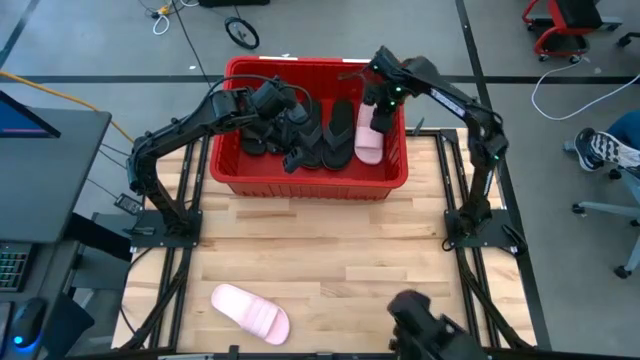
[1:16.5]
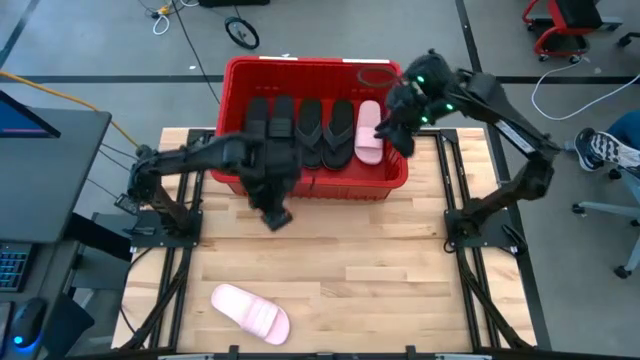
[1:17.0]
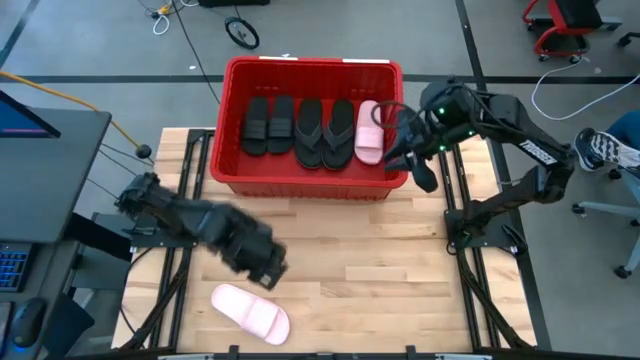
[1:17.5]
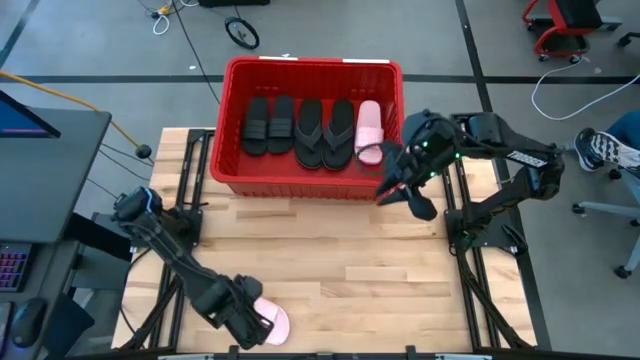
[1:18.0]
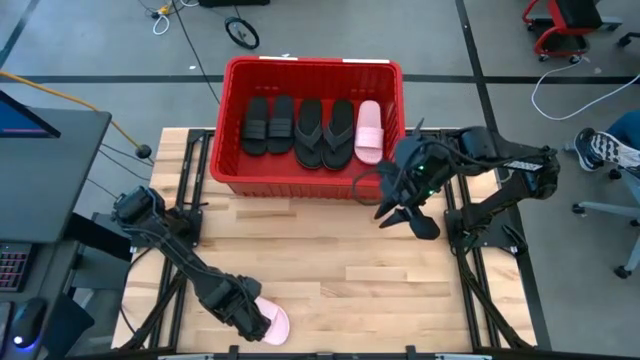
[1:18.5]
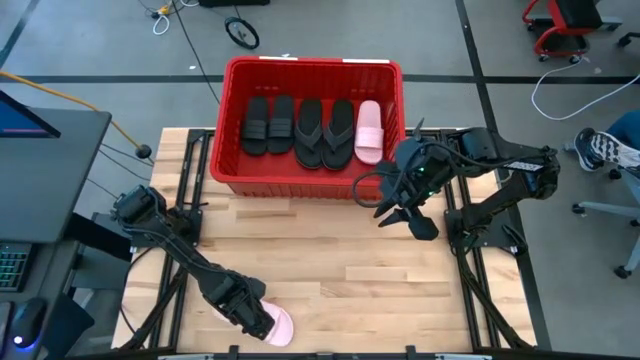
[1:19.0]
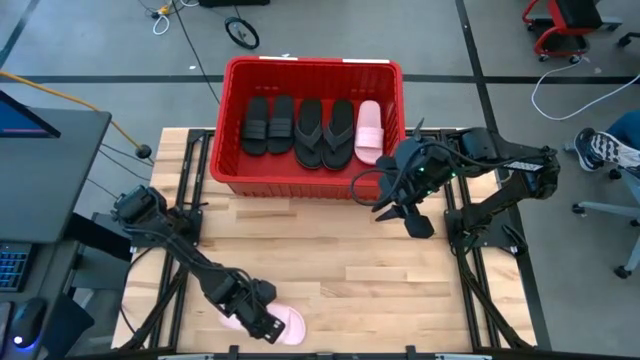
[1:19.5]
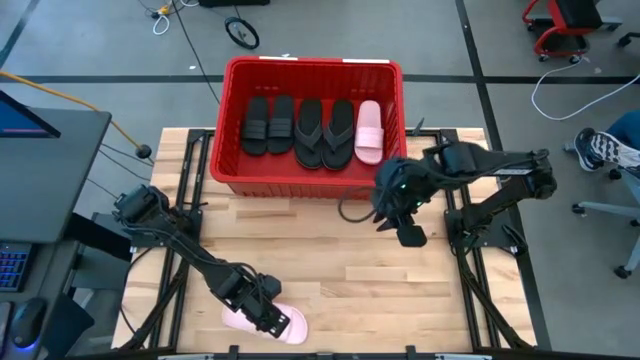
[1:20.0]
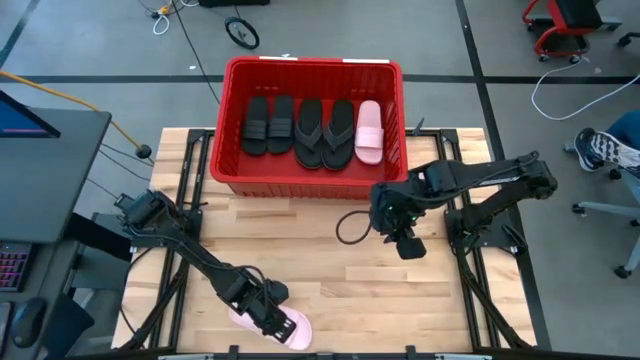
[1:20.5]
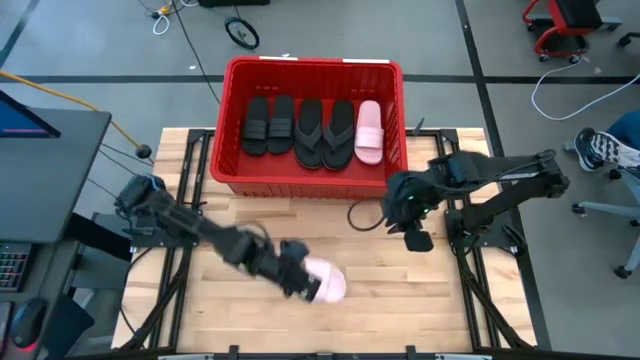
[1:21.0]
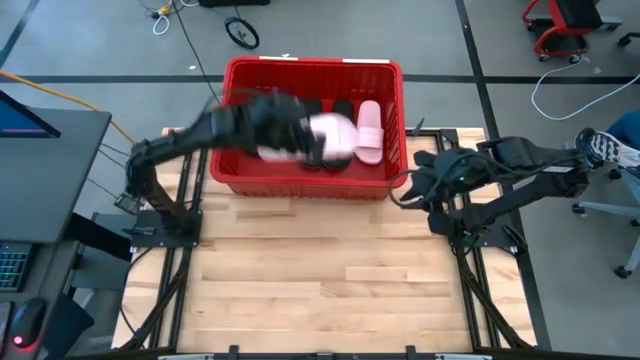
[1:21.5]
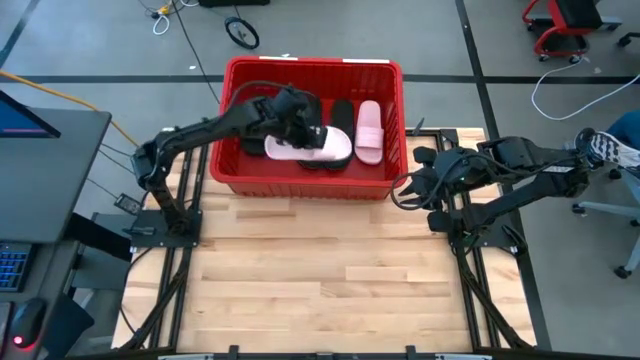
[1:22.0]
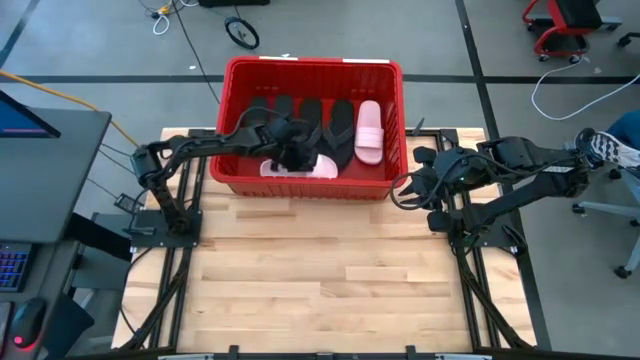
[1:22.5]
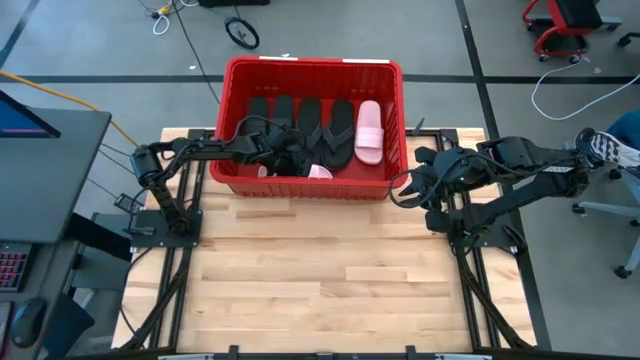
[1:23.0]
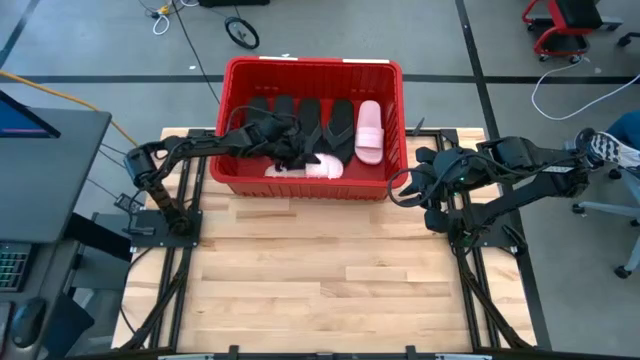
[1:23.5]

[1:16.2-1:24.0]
Task: Pick and place slides into bin
Put the pink slide into the red container

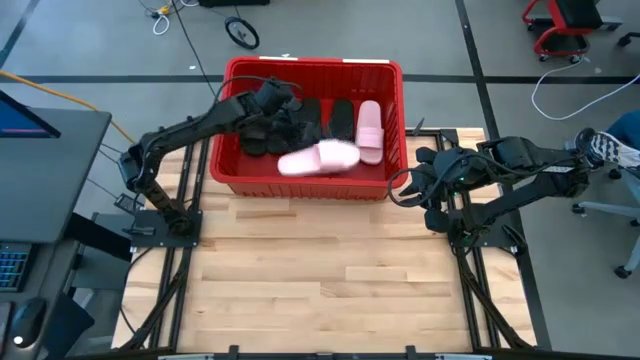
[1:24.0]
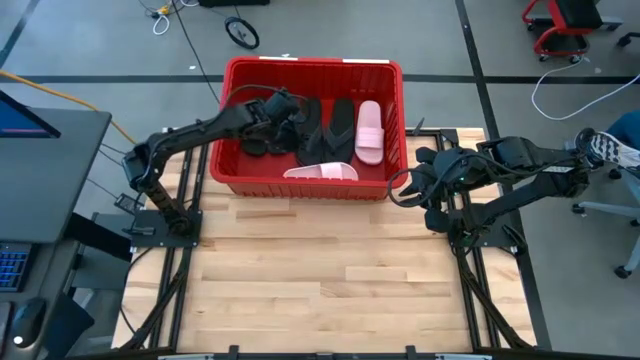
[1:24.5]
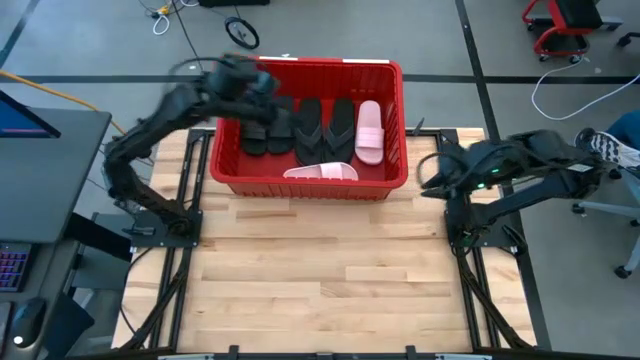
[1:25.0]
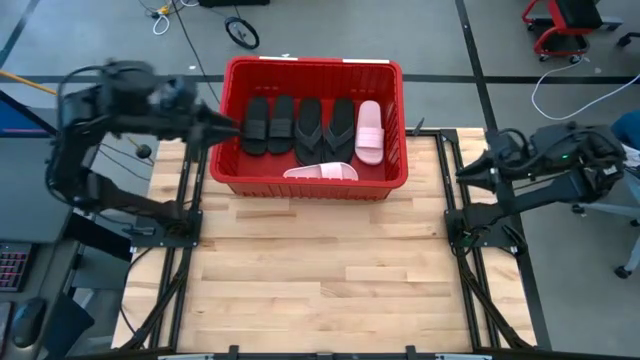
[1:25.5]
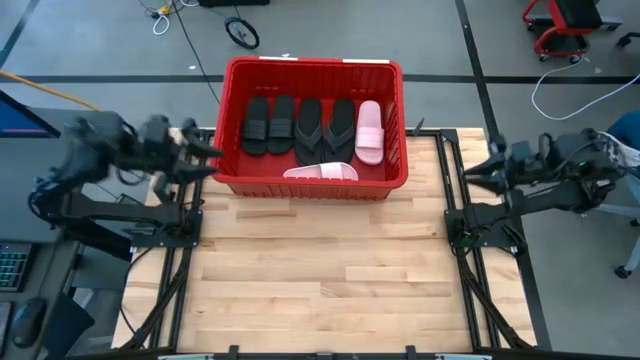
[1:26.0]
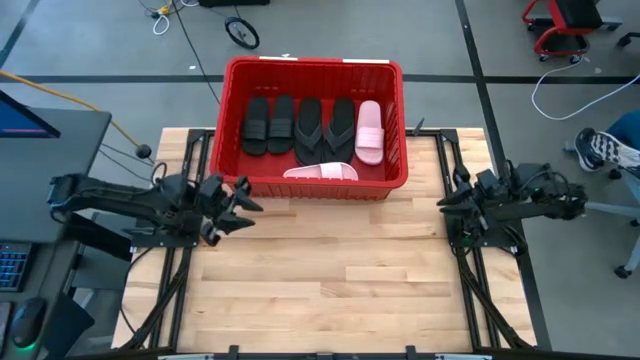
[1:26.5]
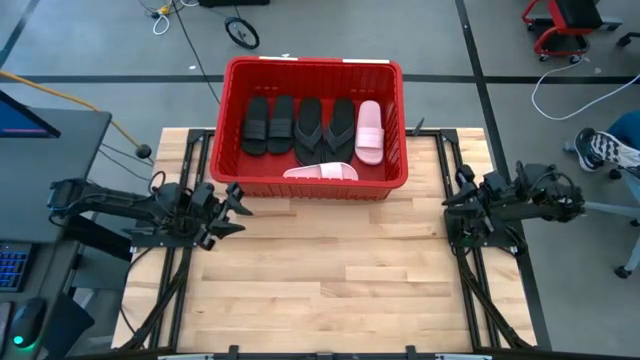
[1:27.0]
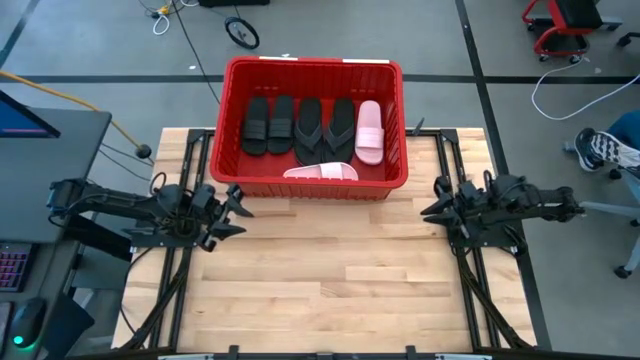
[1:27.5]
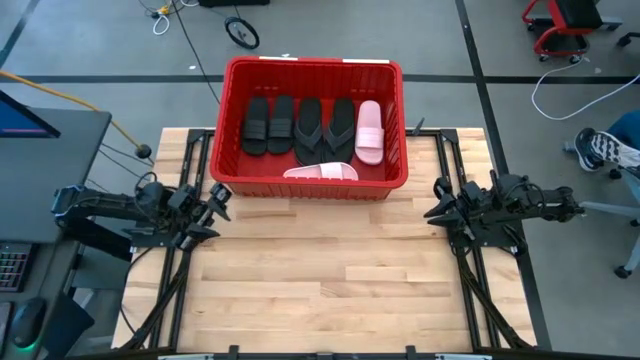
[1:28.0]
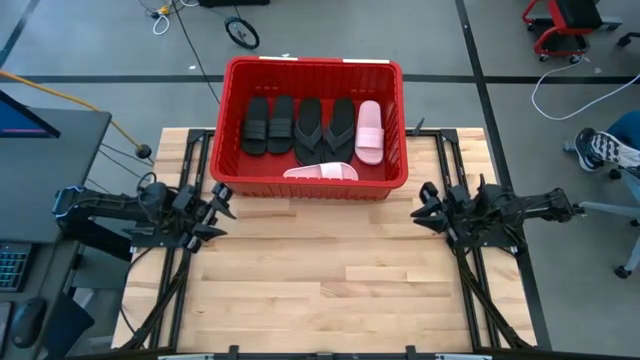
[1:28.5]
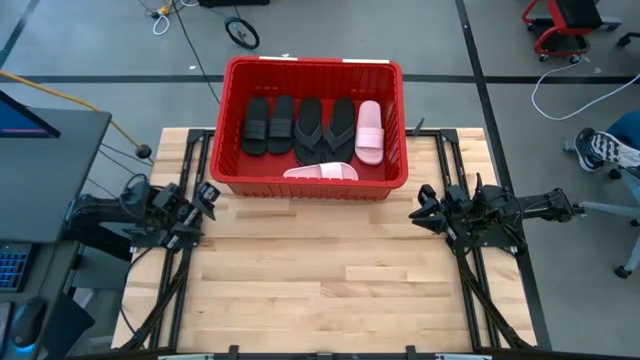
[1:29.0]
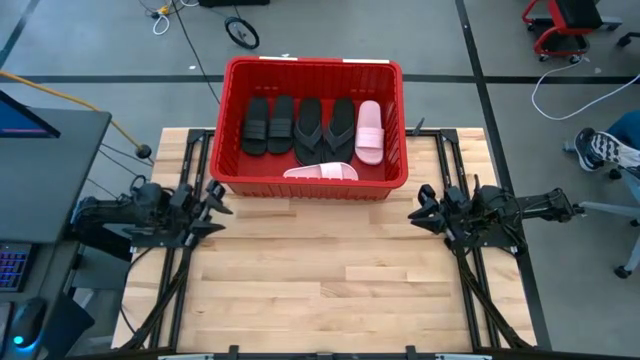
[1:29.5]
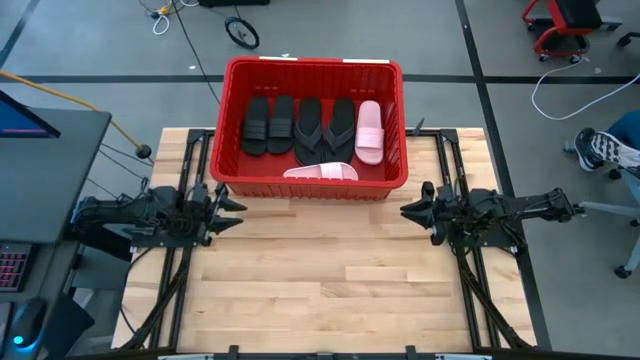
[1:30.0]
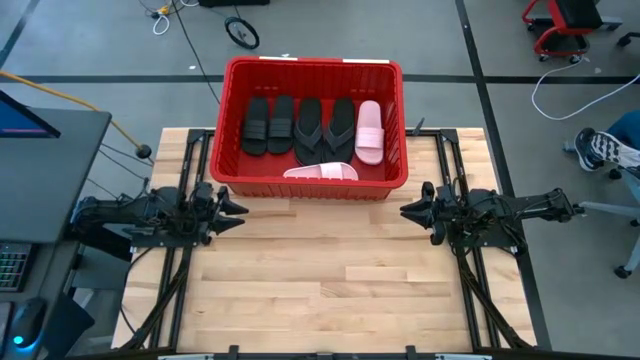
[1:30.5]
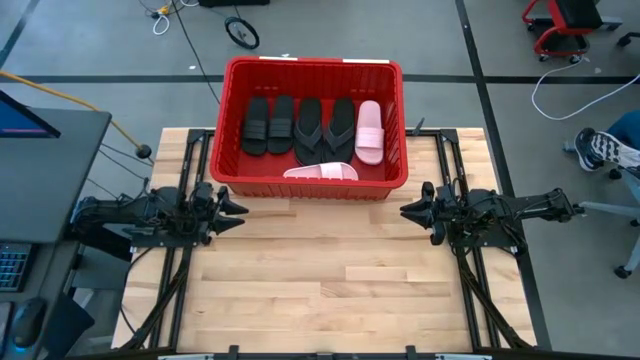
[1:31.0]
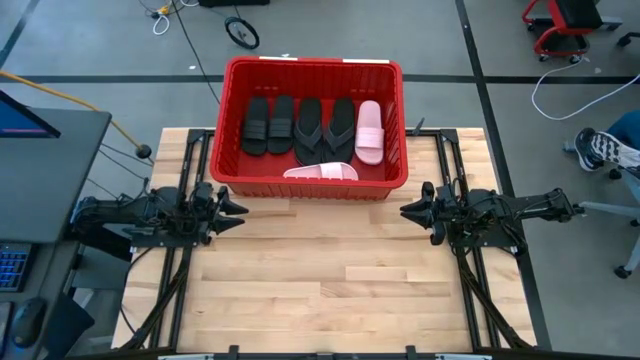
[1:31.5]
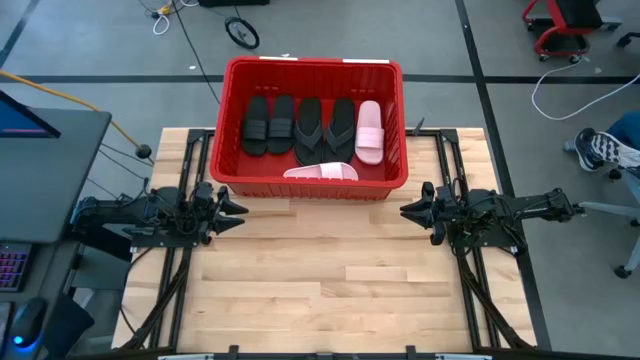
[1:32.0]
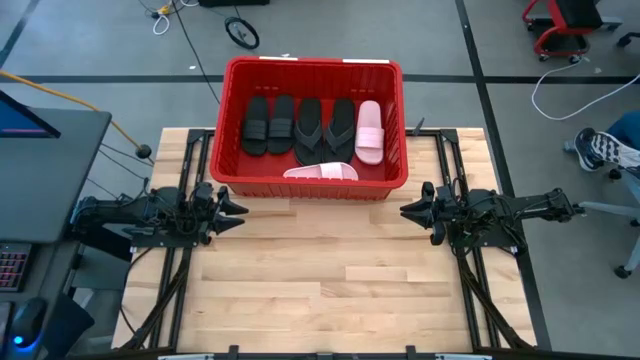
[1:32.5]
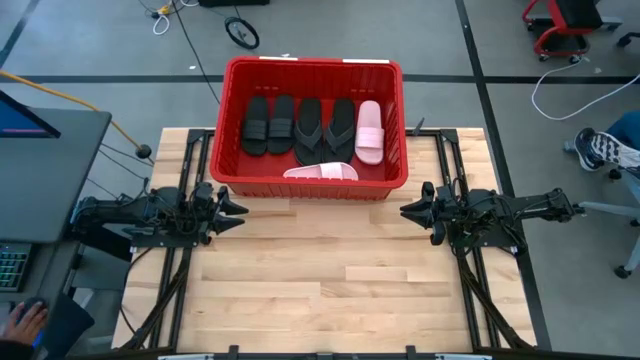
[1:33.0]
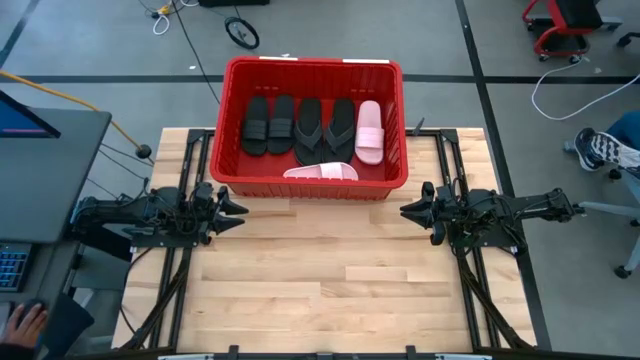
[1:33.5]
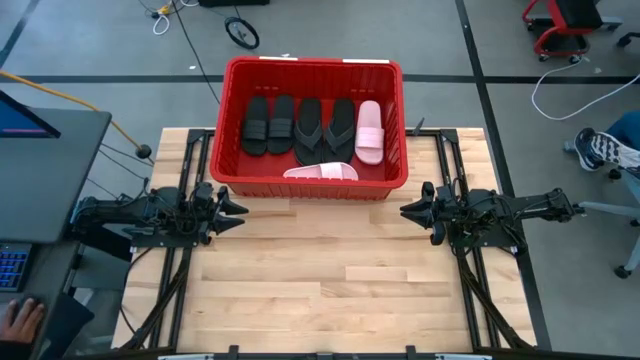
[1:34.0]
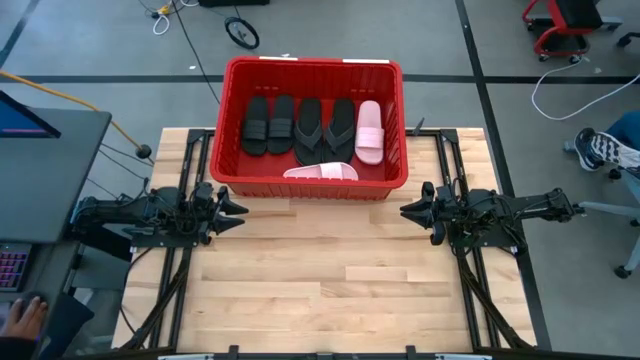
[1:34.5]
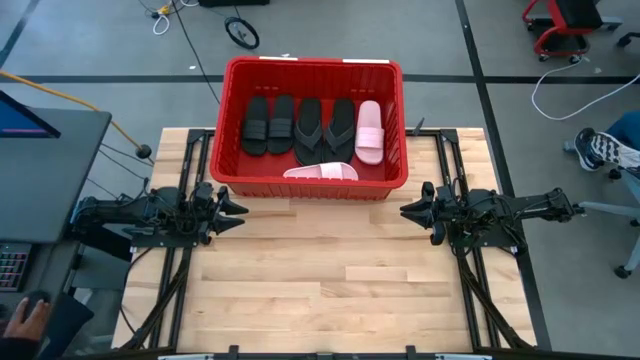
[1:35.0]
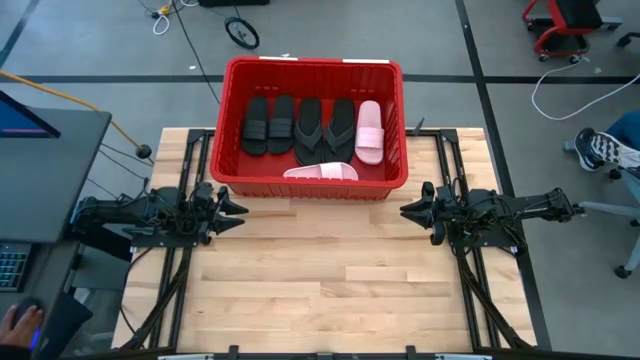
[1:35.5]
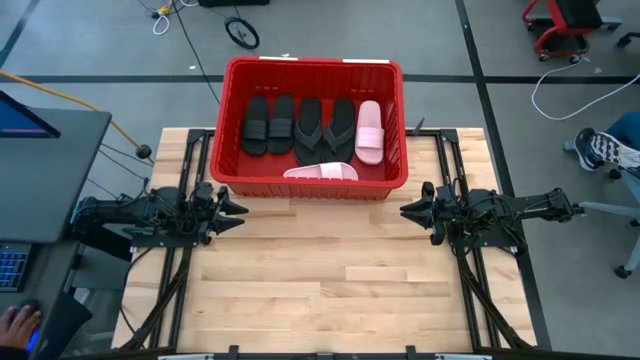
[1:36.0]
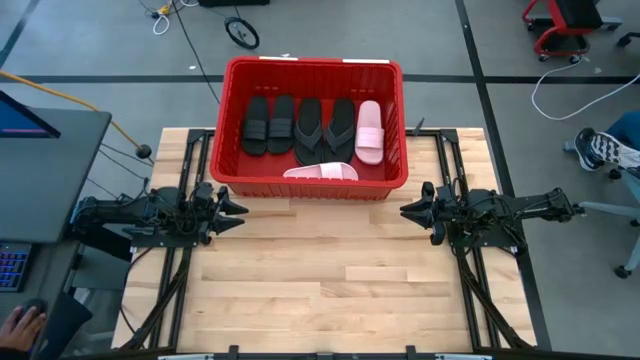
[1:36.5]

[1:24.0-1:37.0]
Return to Home Position

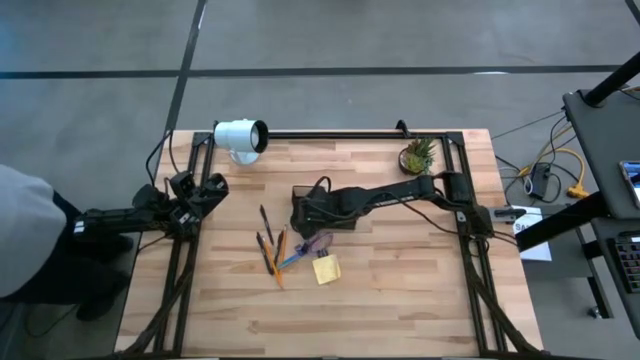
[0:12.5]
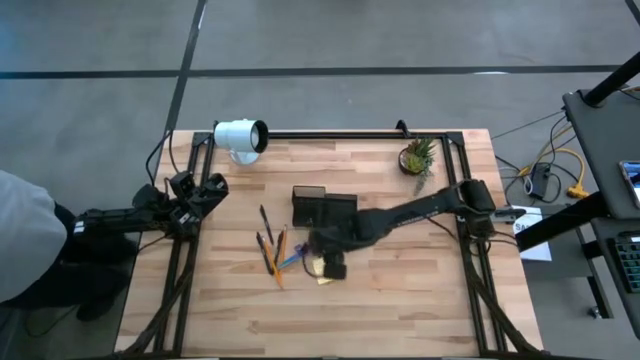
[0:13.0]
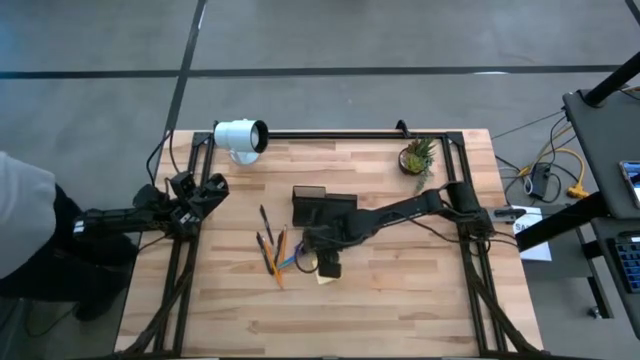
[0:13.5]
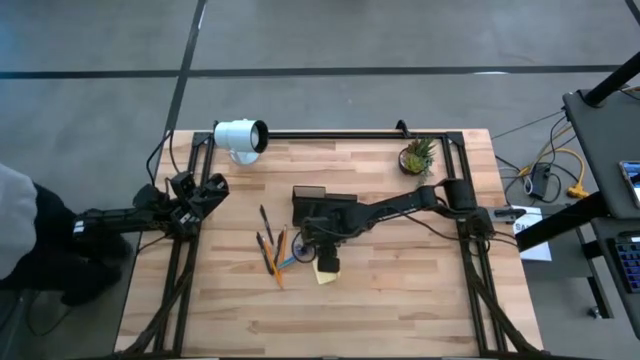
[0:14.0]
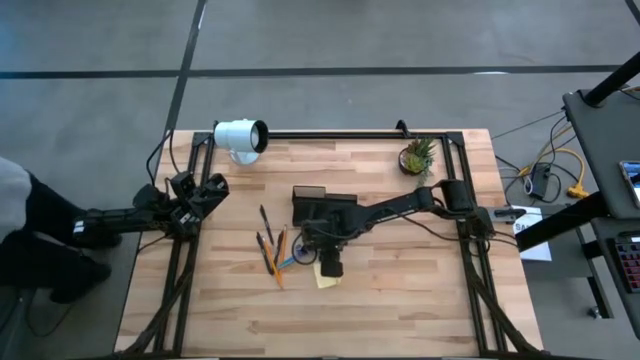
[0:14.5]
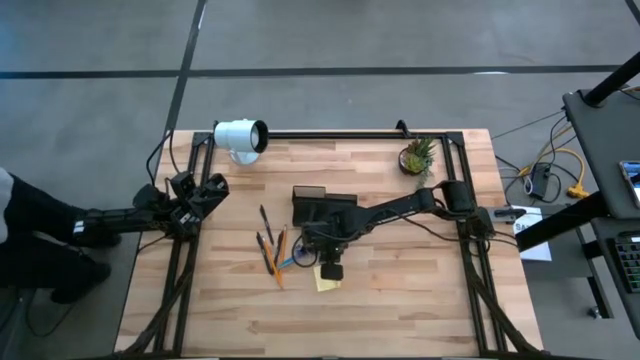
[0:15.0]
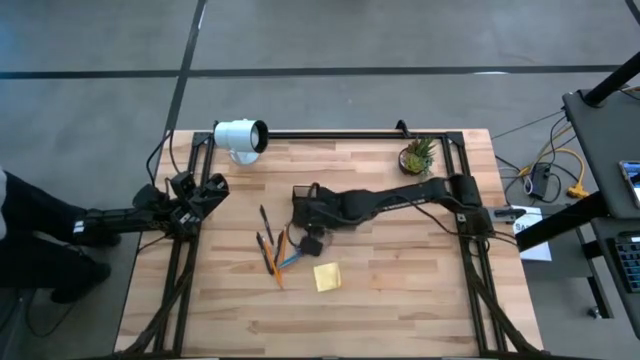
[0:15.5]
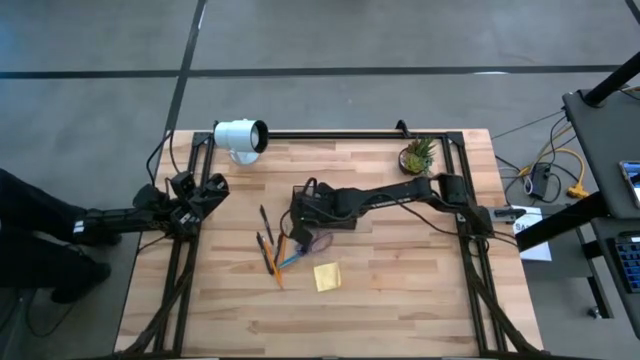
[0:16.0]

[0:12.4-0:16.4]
Task: Pick and place office supplies into organizer
Put the right black binder clip into the black desk organizer
